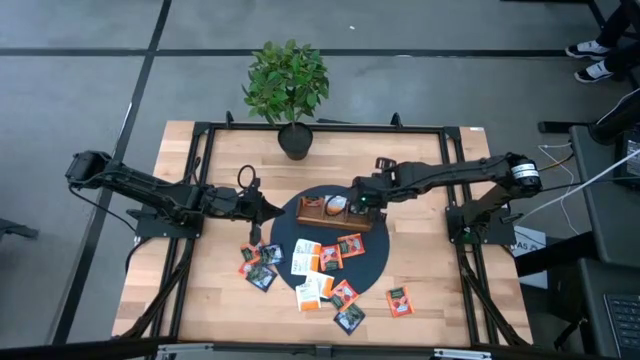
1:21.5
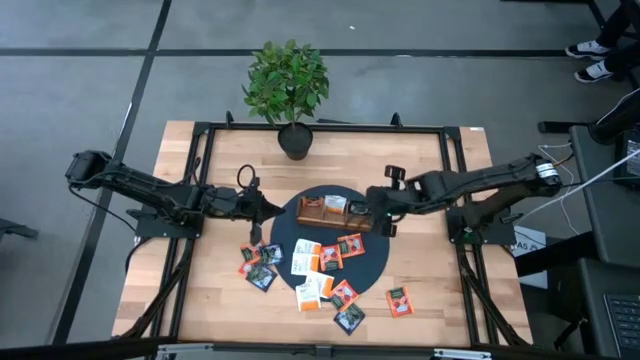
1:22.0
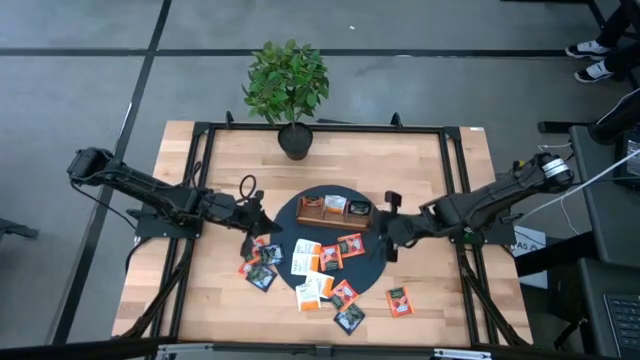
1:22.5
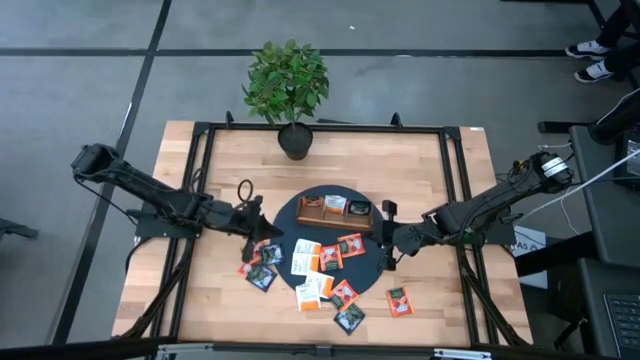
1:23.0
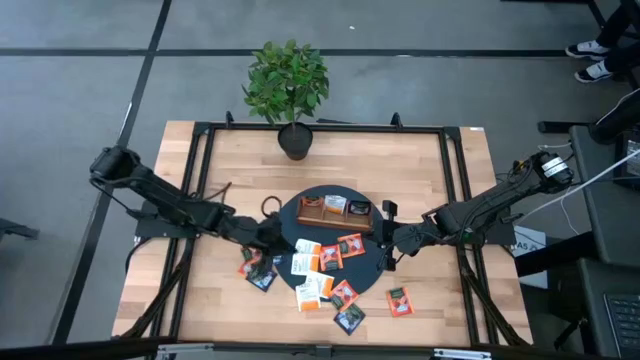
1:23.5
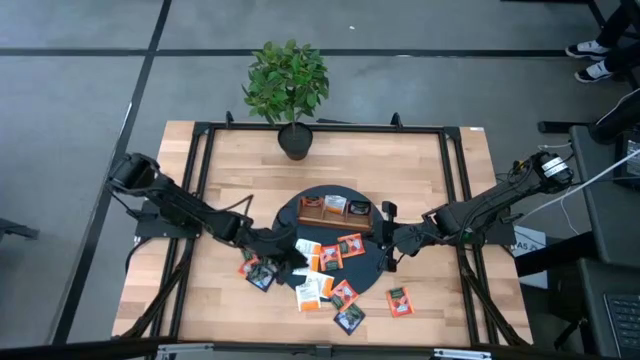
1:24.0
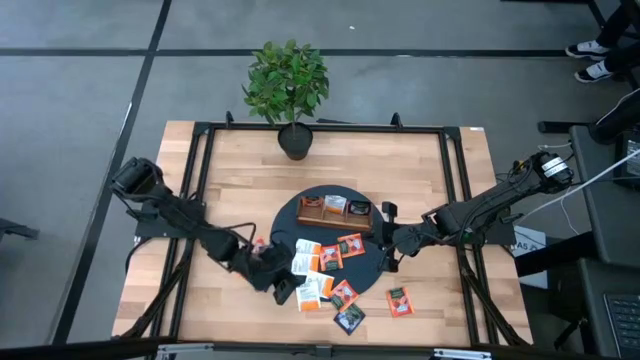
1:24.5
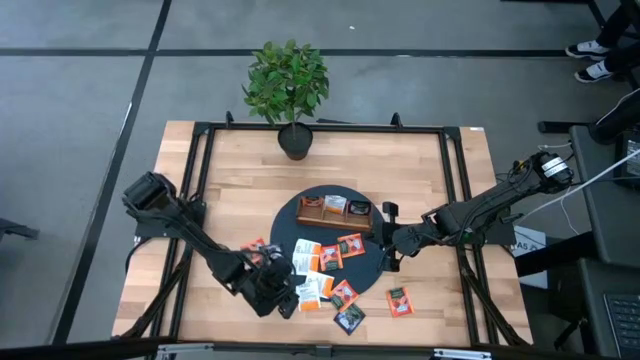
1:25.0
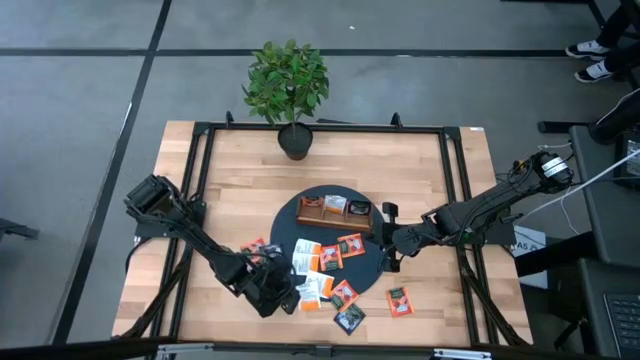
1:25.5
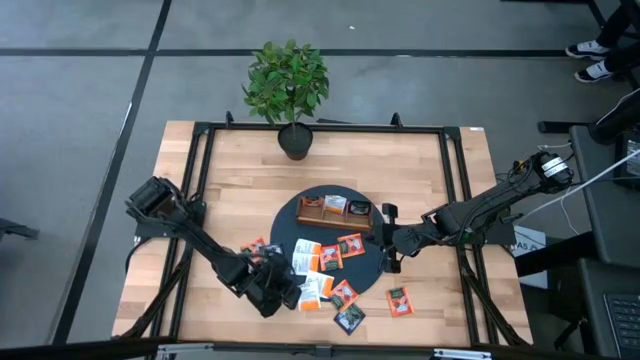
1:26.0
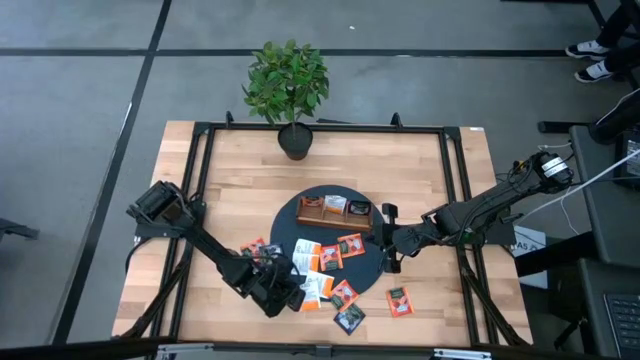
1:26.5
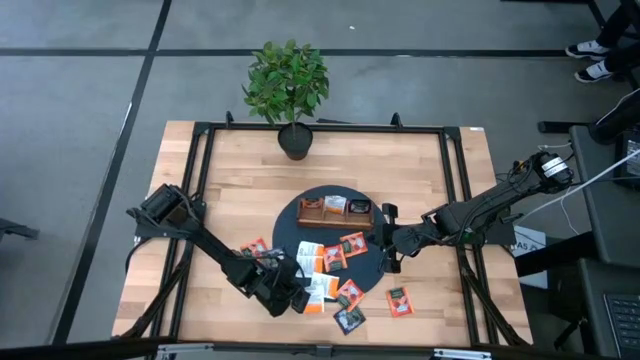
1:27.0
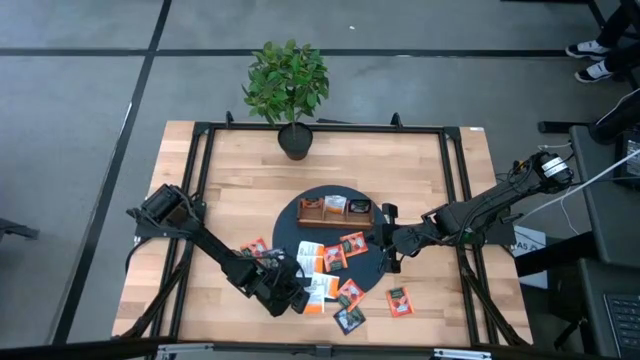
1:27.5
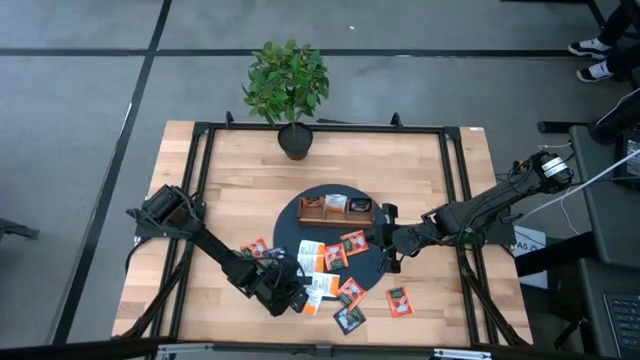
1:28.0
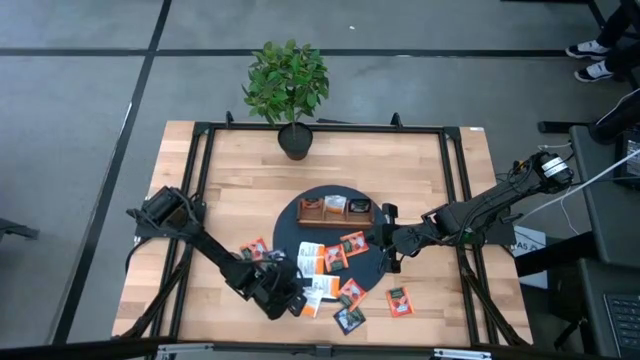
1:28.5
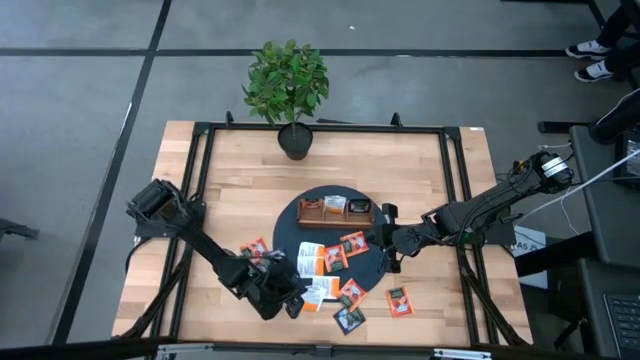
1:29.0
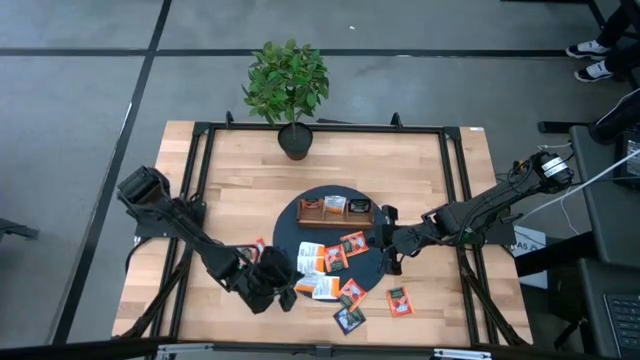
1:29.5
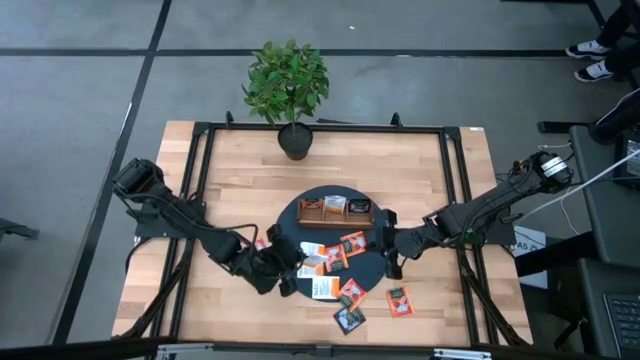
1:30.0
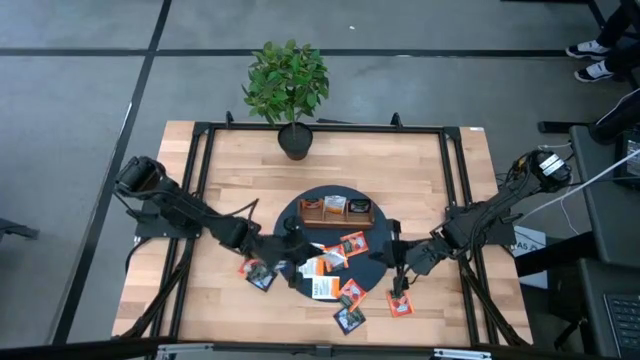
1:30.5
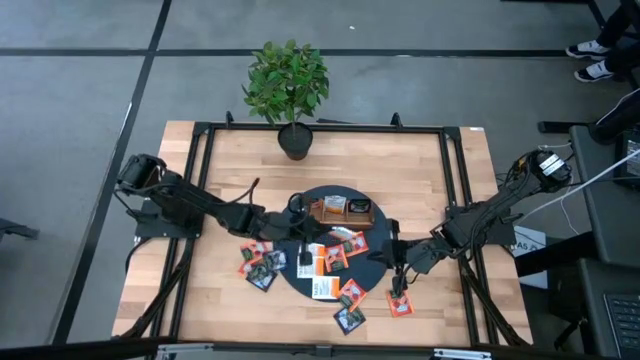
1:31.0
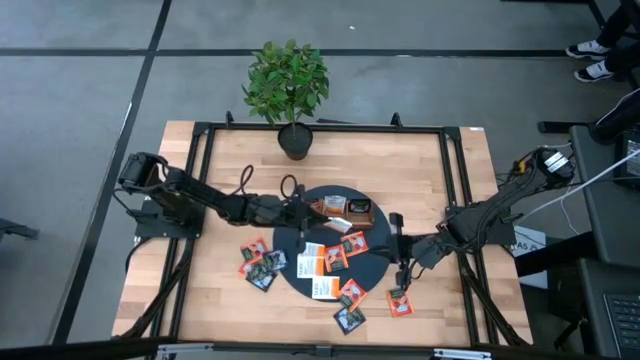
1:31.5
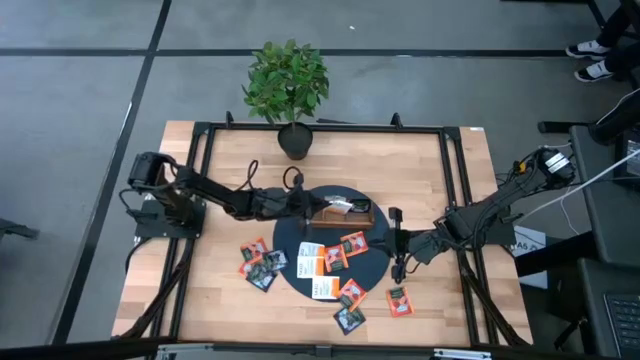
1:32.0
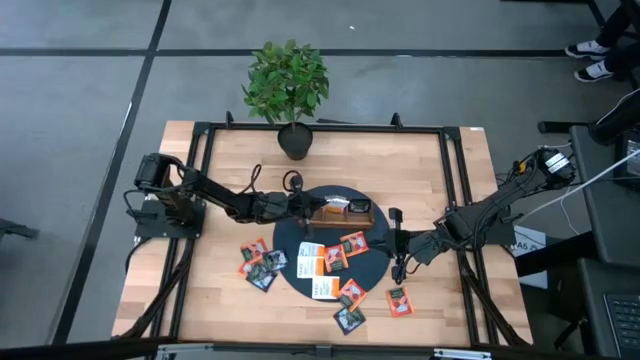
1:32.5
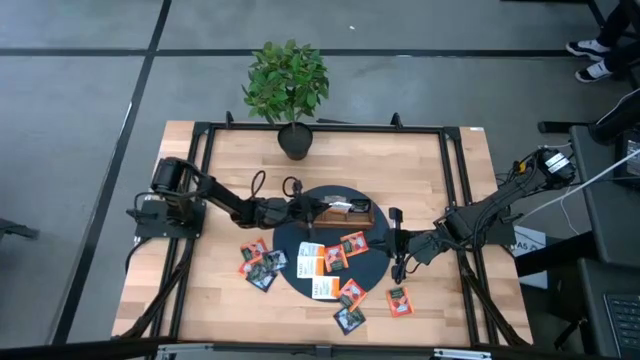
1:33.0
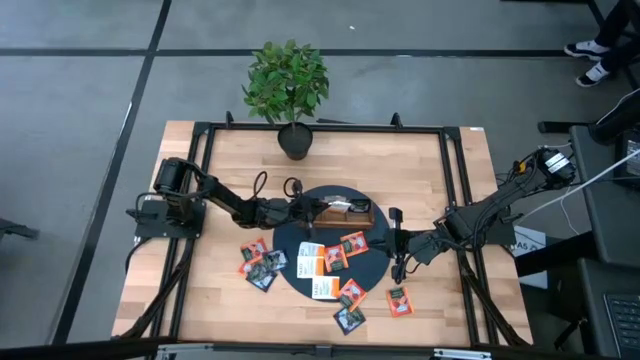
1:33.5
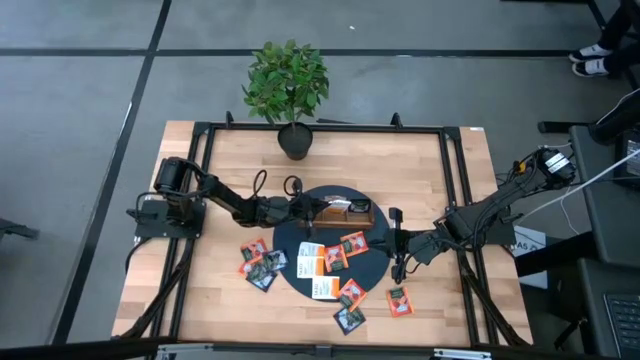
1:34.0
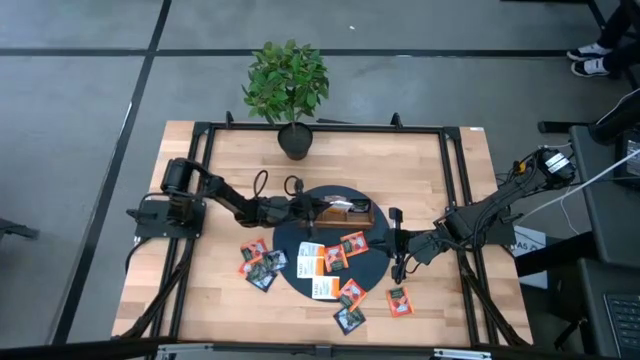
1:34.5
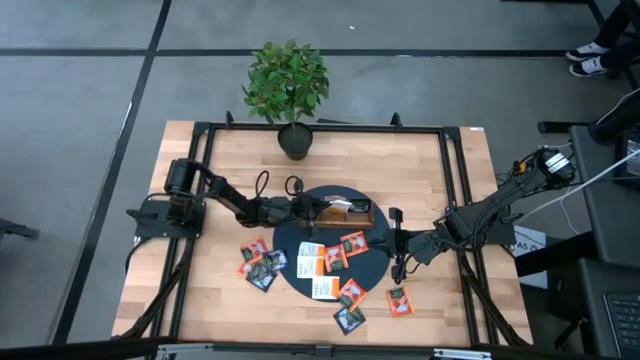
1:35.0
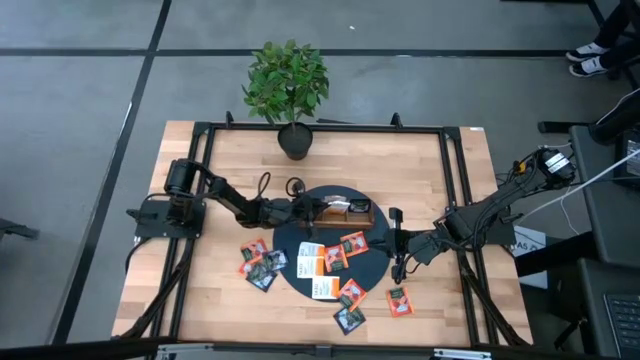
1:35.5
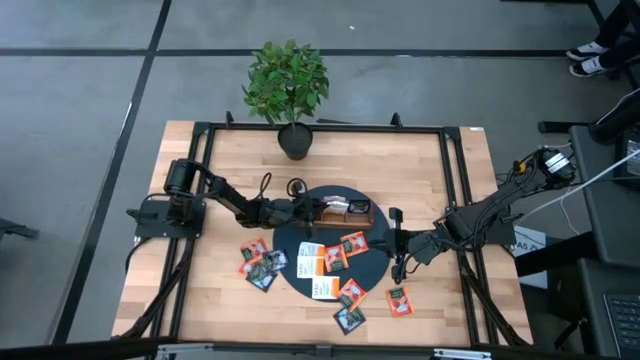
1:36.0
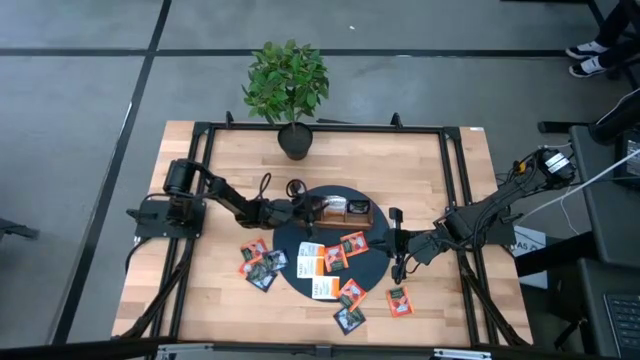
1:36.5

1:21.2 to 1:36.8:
Task: Pick & Place Tea
Put the white tea bag into the middle of the wooden organizer

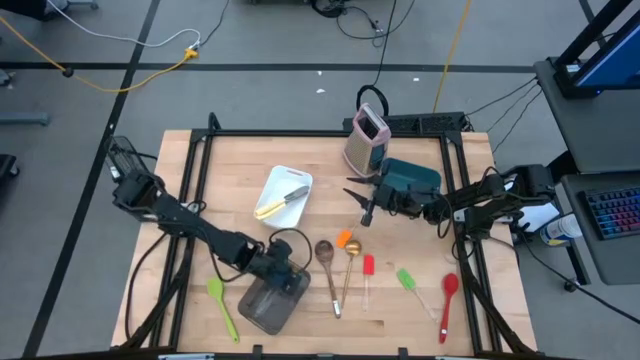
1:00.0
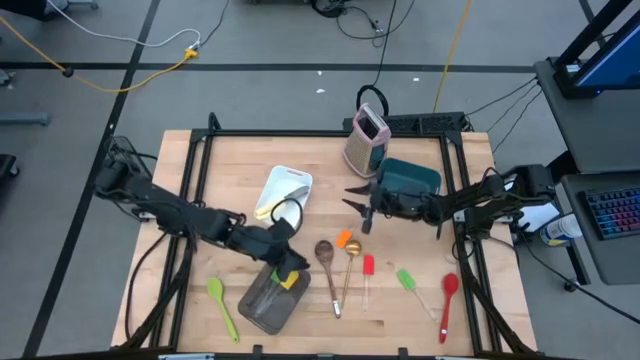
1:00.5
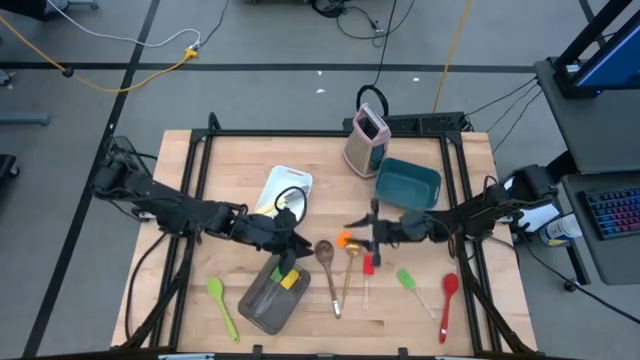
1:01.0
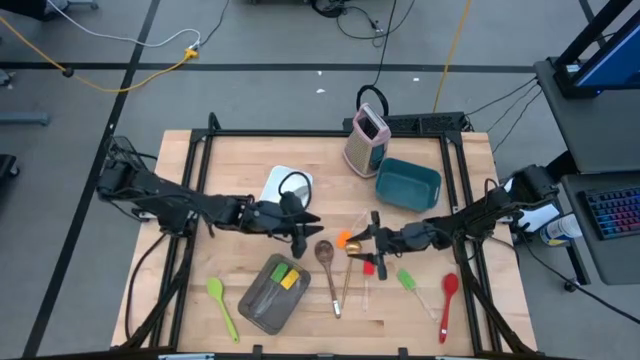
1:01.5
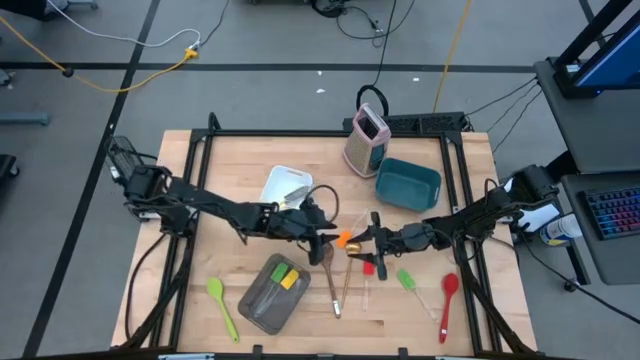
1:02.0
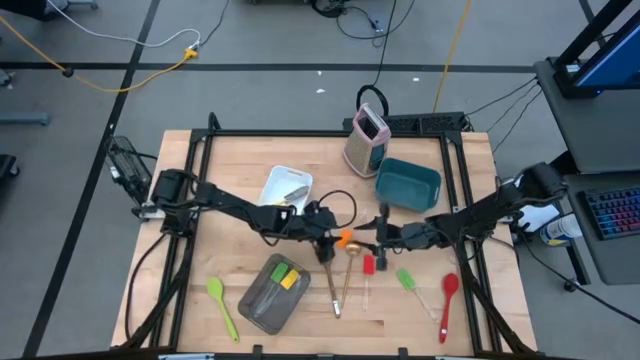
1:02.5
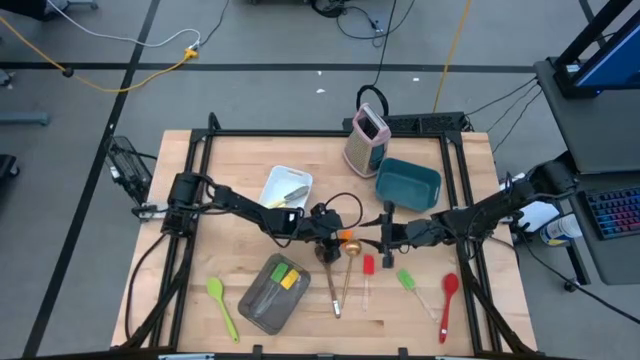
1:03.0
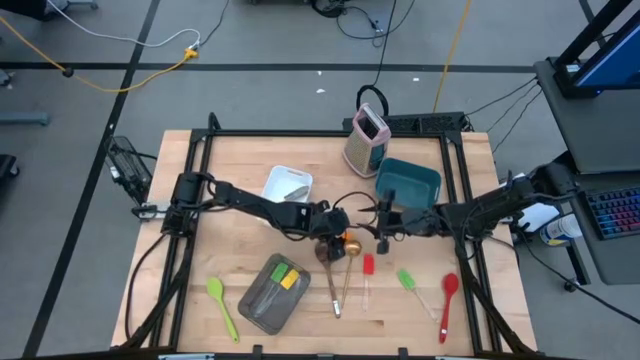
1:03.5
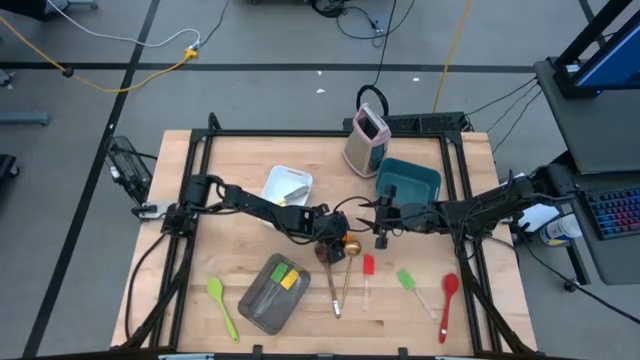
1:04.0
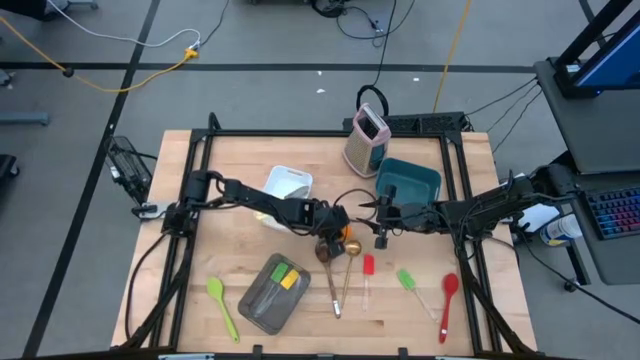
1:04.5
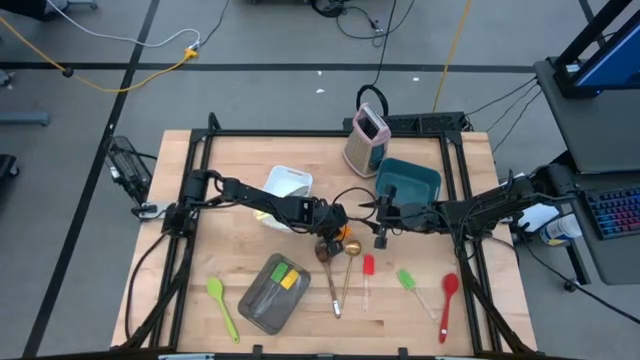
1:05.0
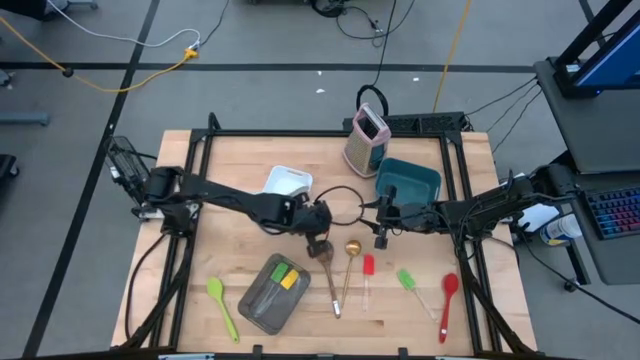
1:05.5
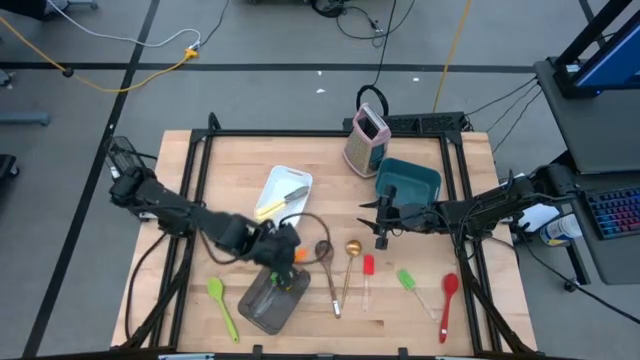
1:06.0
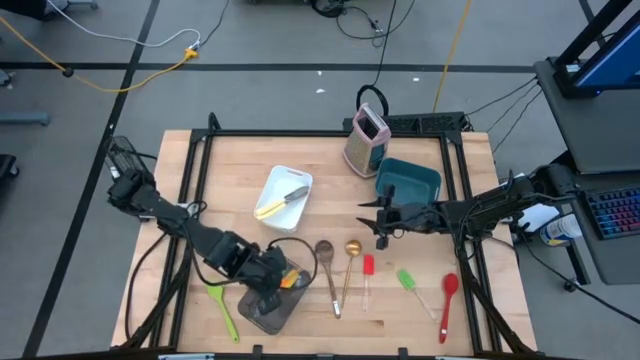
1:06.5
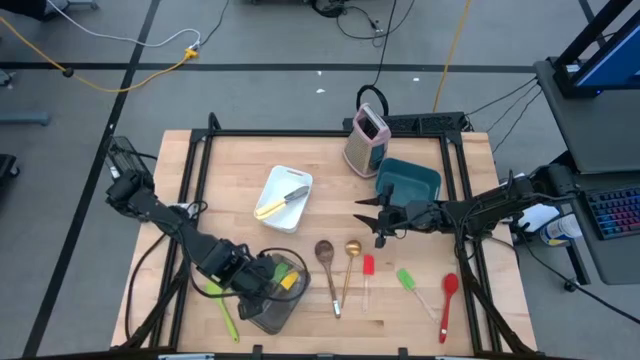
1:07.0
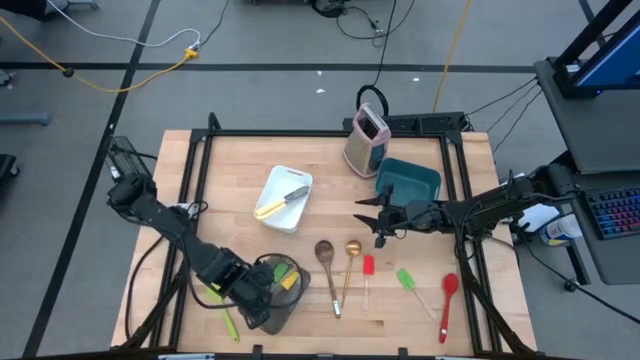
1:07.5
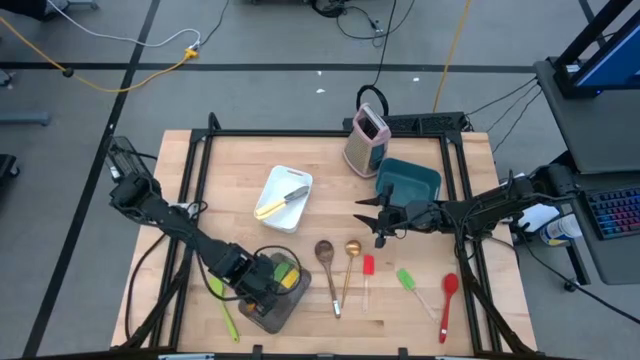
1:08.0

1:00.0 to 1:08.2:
Task: Pick & Place Kitchen Items
Put the orange spatula into the black bin
